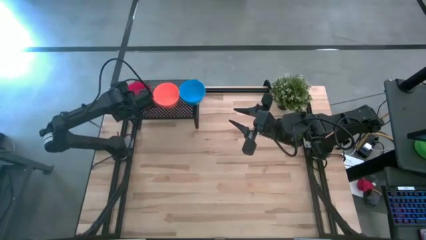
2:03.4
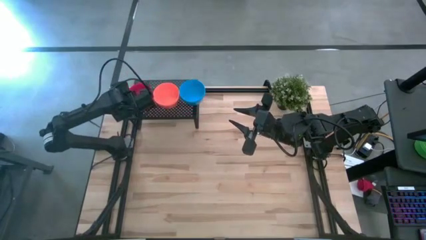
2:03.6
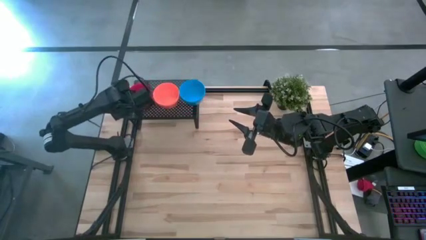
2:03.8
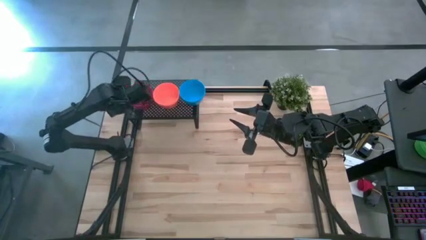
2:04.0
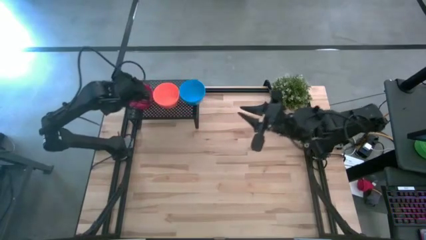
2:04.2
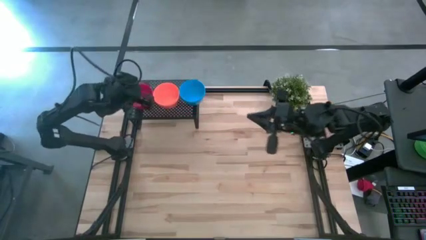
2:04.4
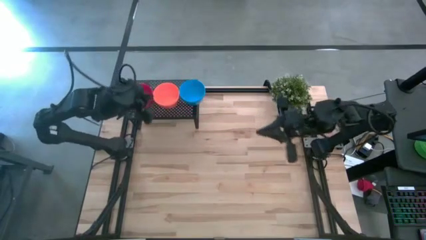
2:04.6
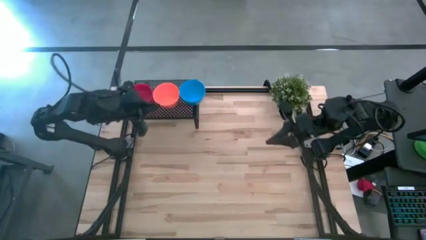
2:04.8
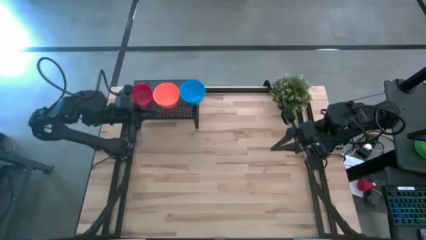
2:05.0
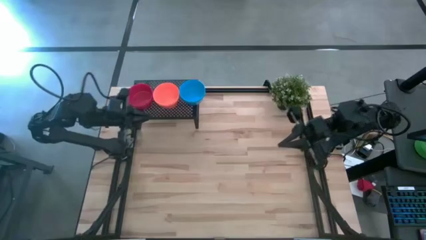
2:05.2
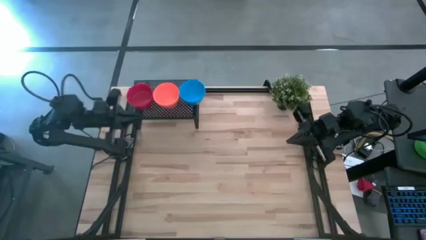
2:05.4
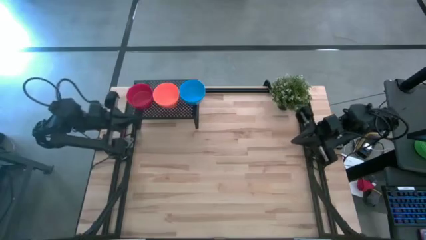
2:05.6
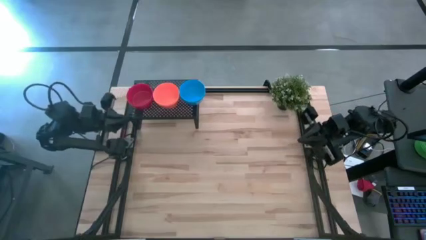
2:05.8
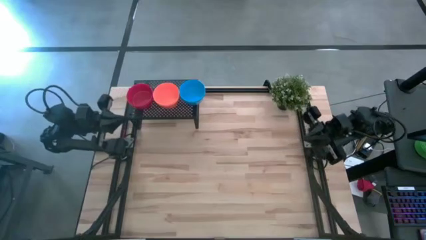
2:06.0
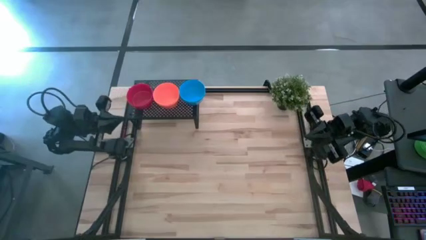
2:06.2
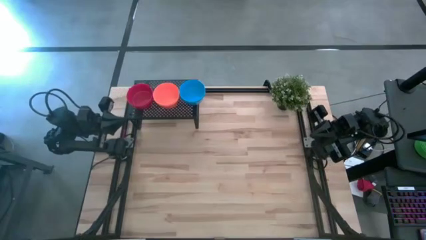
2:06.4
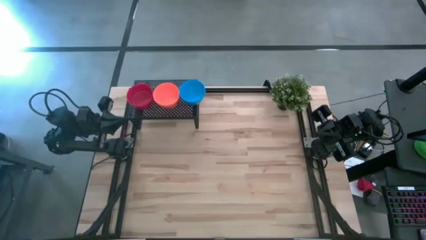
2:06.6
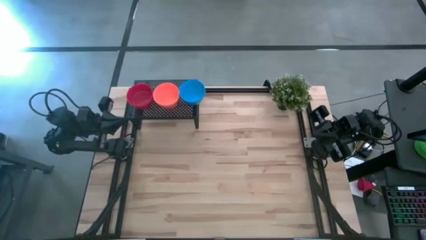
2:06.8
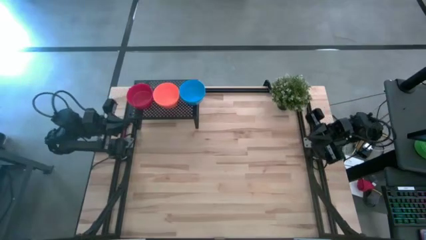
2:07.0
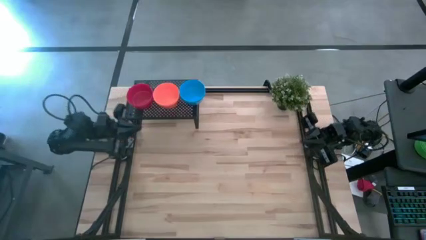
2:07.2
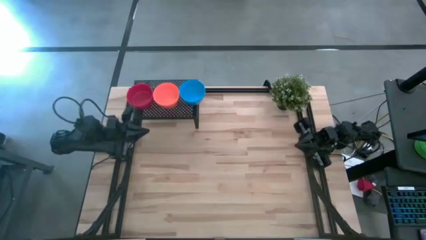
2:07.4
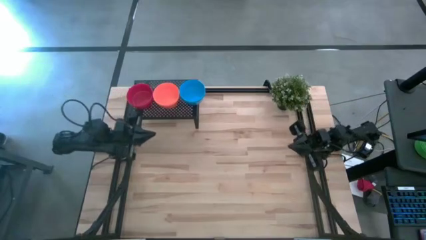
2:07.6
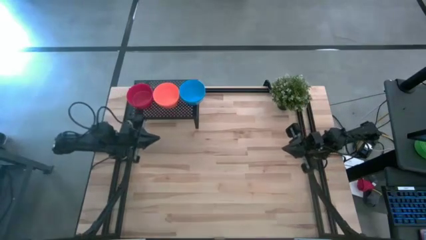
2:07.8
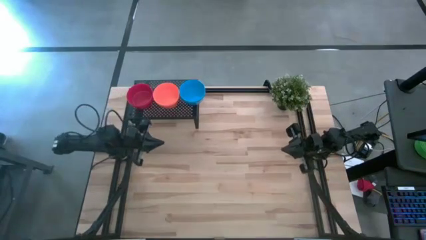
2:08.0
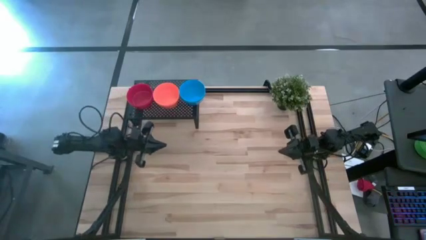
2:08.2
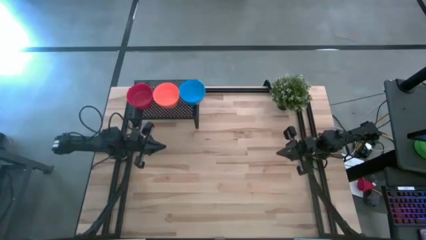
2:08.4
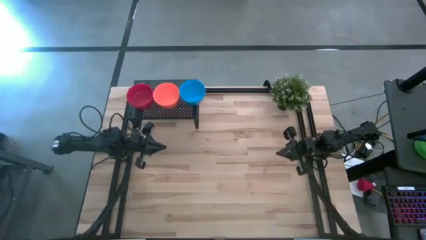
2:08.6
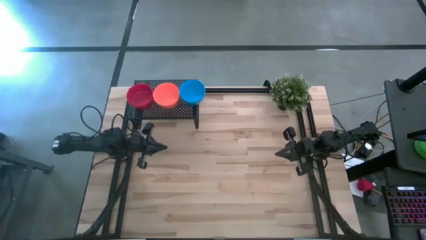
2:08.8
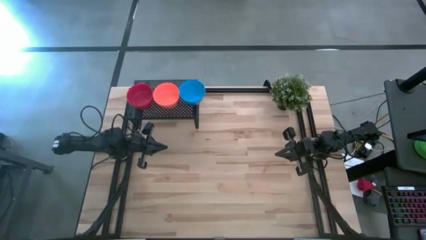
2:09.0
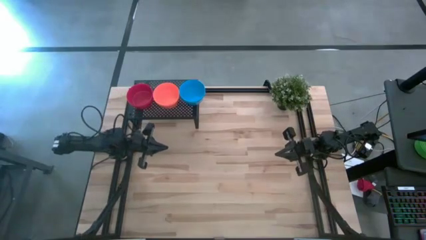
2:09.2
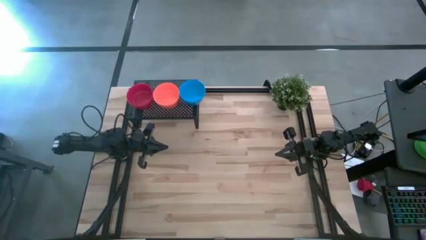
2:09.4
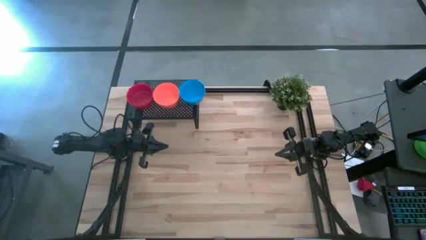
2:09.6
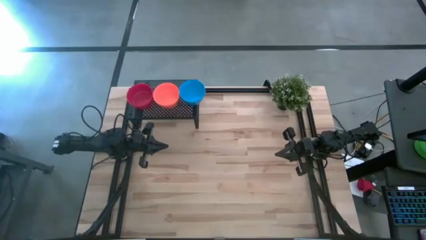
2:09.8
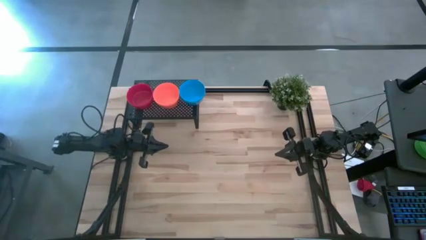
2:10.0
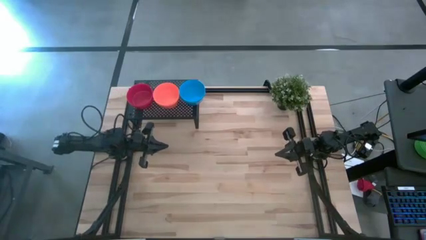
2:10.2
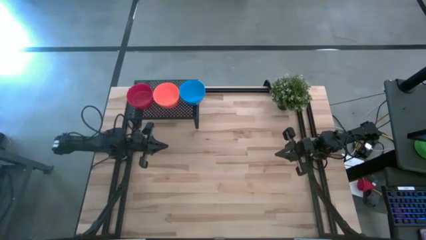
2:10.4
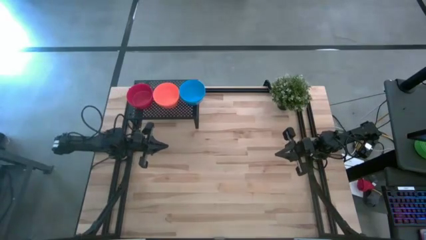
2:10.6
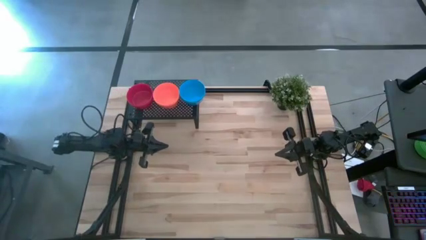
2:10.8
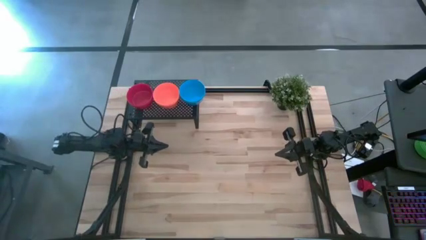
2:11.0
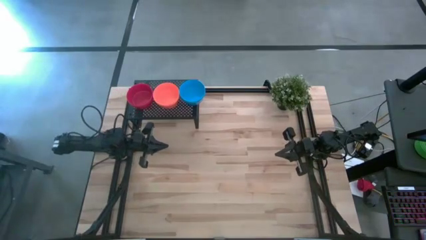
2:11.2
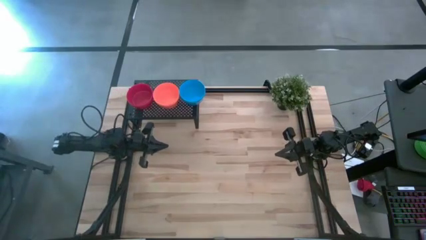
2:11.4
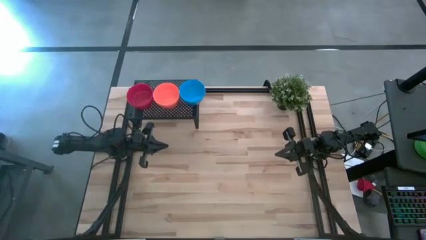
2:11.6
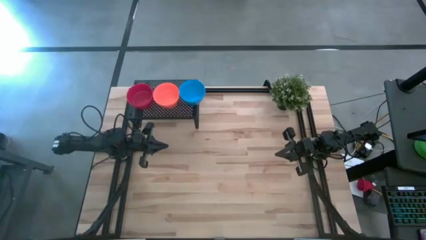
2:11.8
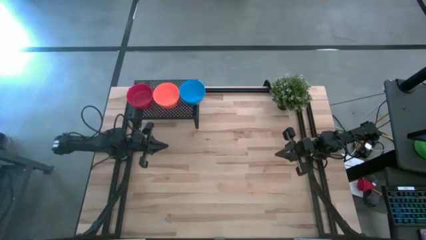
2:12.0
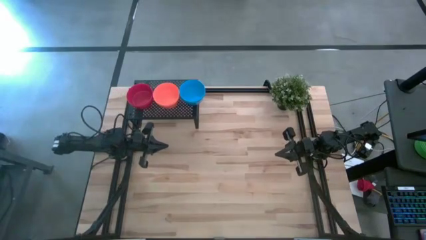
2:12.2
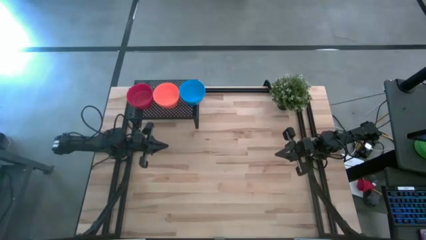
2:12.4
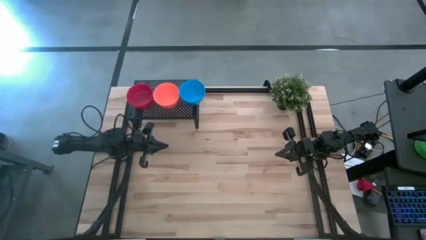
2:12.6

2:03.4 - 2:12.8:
Task: Pick & Place Mini bowls
Return to Home Position

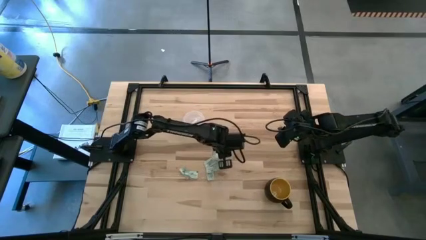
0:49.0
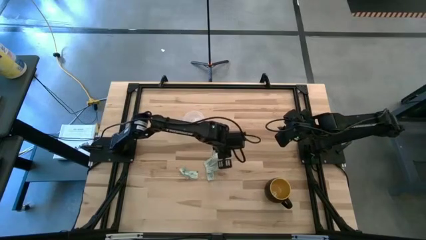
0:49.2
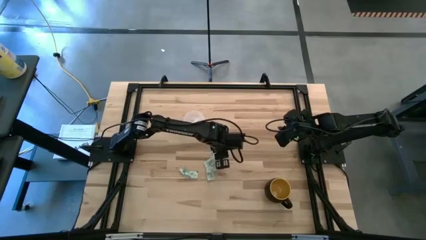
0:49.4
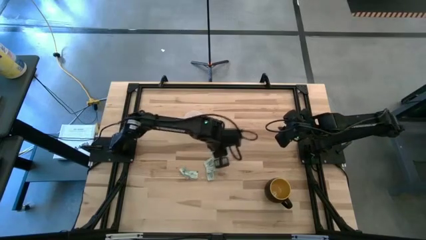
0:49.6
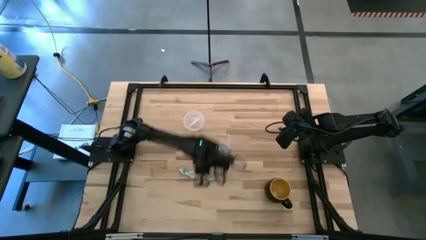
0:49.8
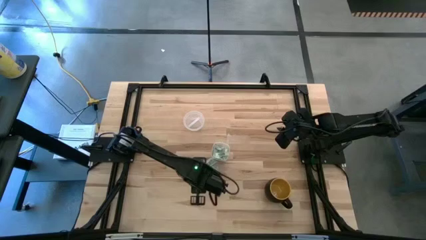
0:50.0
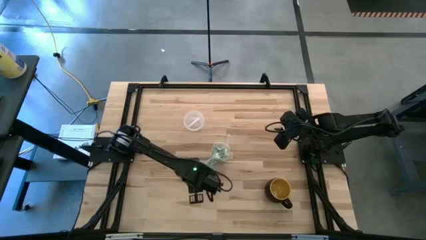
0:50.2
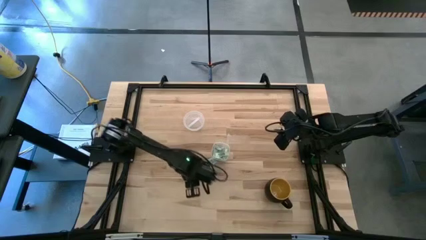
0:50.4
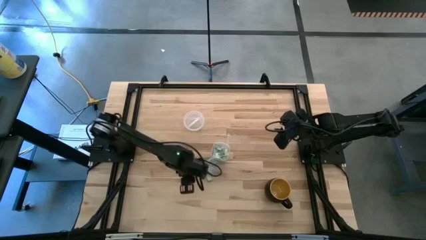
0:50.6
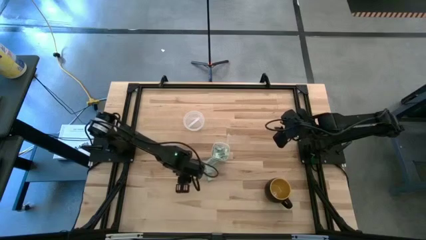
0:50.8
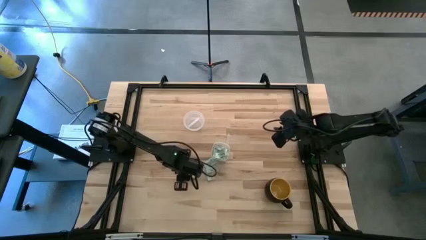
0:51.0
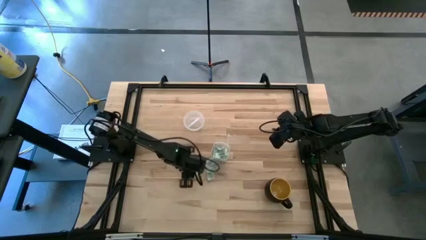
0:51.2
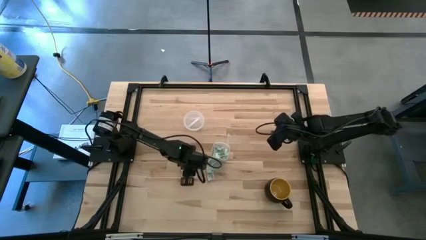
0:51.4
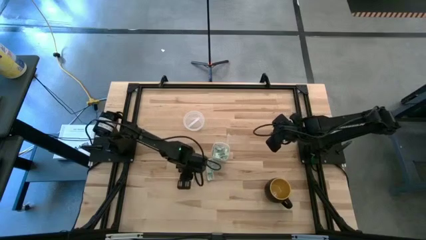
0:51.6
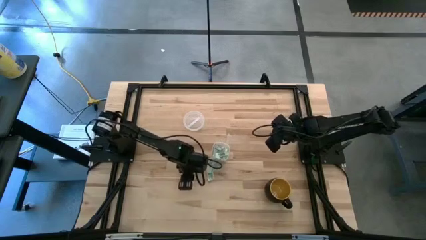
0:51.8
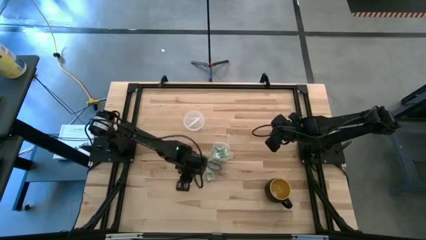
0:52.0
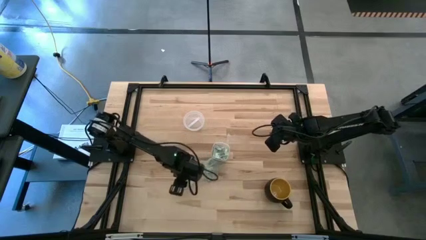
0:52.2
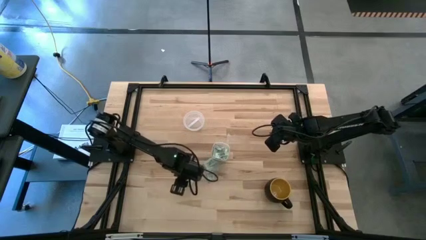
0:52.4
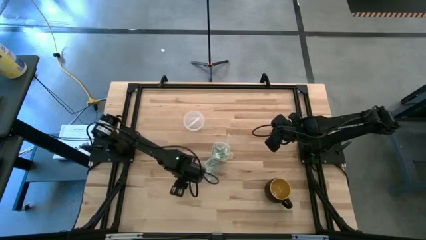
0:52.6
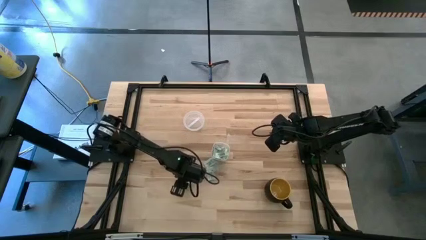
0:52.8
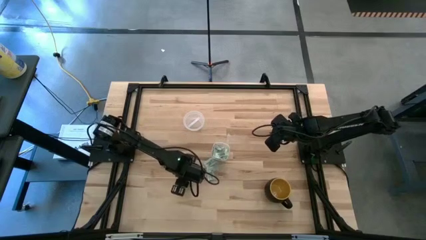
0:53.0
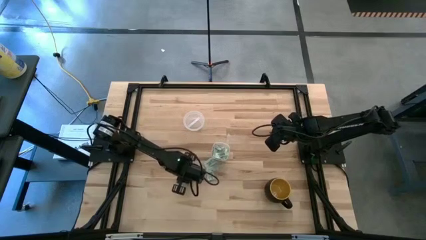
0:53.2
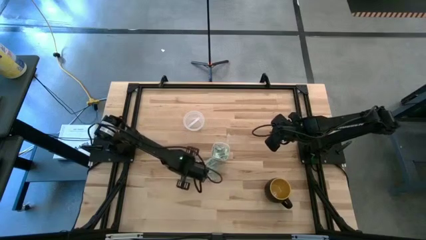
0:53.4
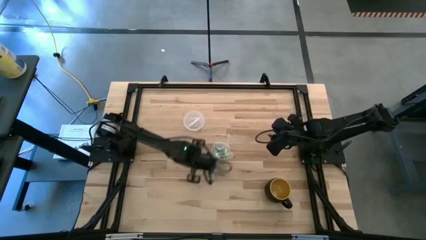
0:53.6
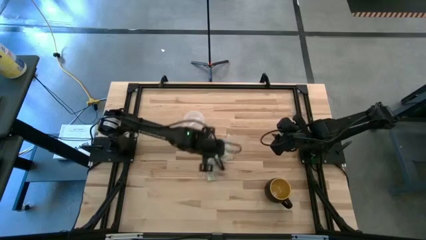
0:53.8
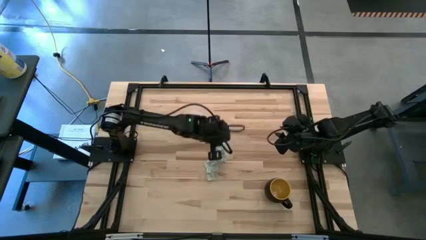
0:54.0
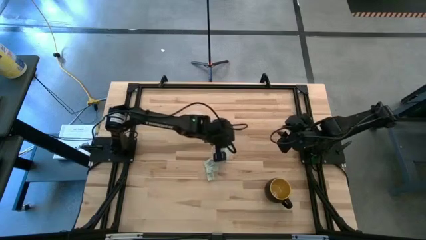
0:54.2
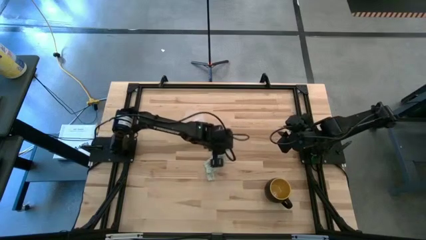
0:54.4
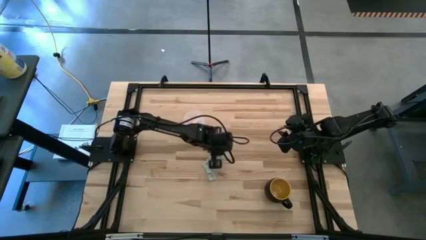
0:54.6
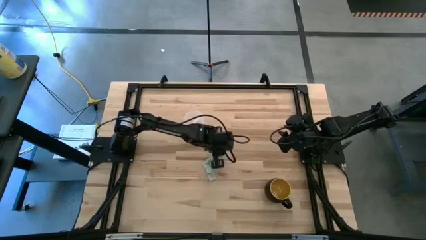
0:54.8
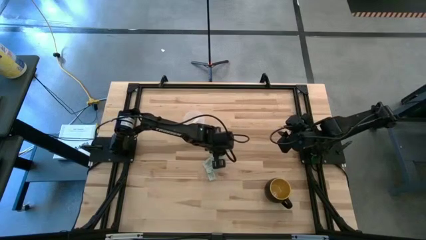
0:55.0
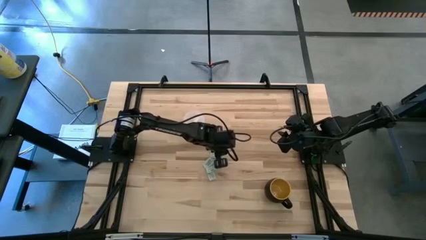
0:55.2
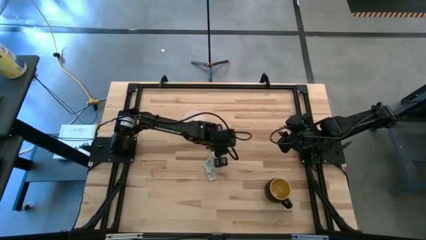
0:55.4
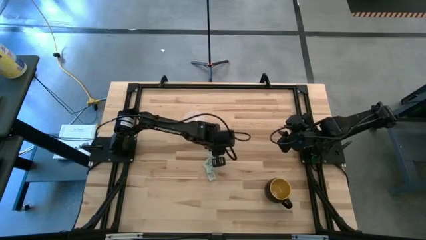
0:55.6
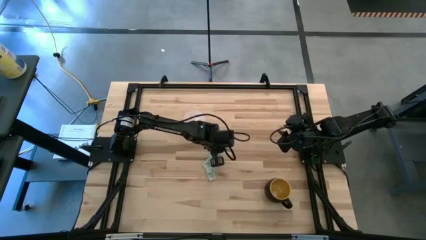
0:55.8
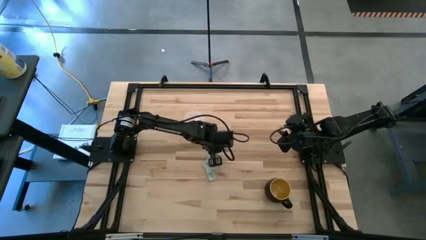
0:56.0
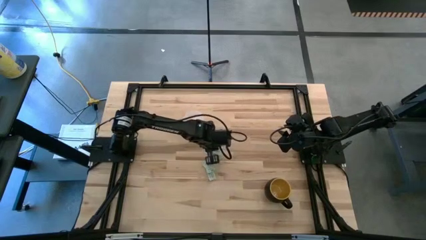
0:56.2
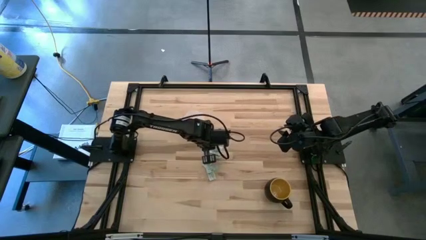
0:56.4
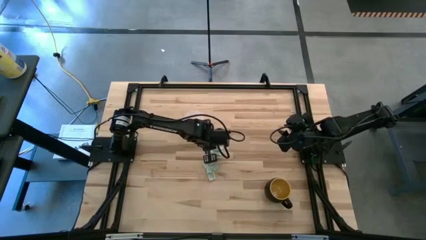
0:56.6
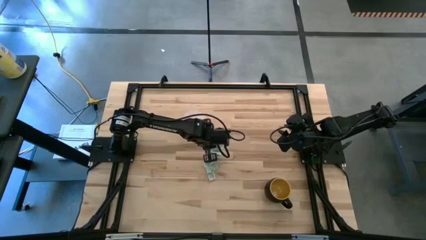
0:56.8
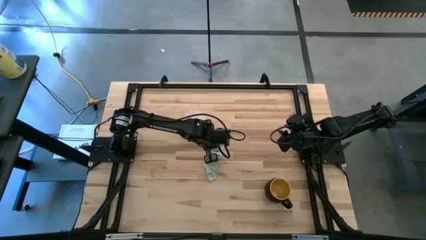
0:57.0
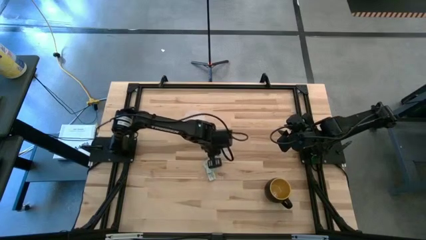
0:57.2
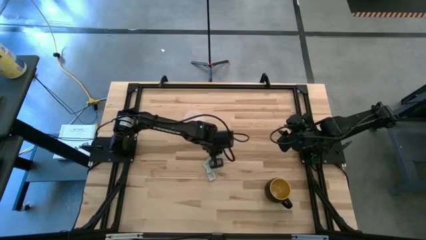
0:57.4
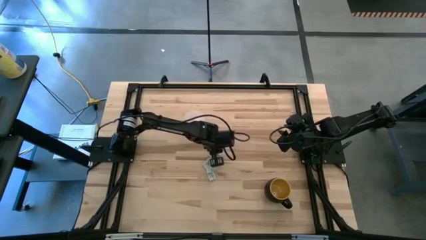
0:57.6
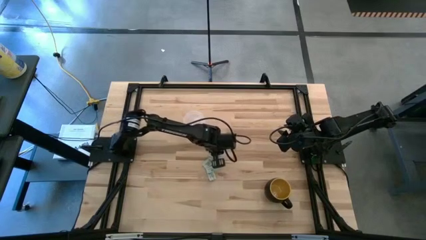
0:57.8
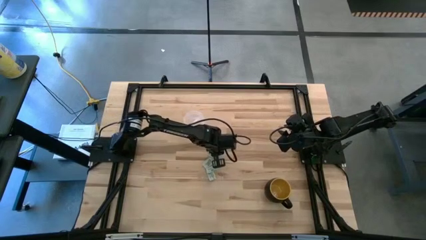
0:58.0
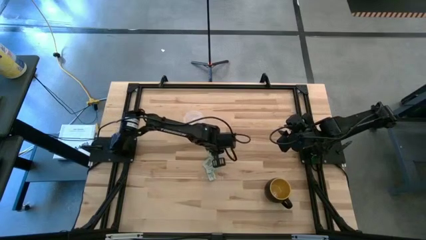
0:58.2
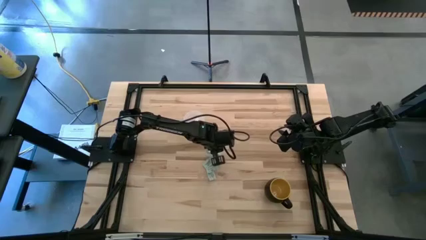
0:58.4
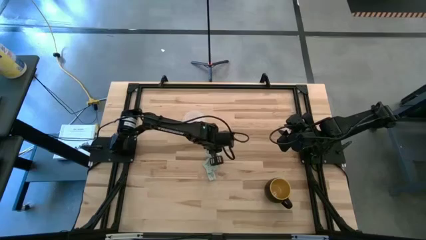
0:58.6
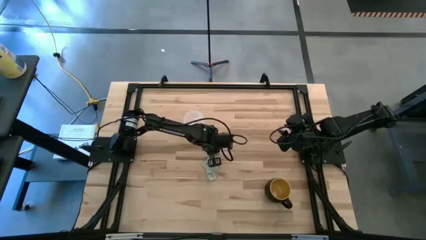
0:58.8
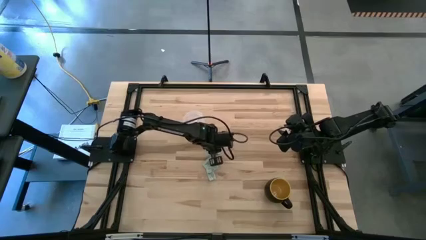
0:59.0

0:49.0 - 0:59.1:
Task: Pick and place items into bin
Put the light green stevia packet into the transparent bin
